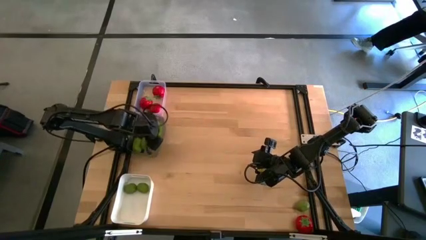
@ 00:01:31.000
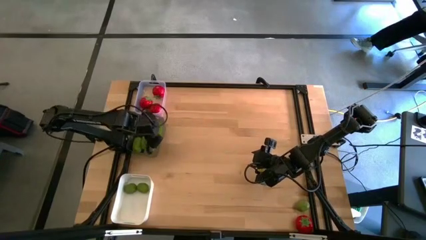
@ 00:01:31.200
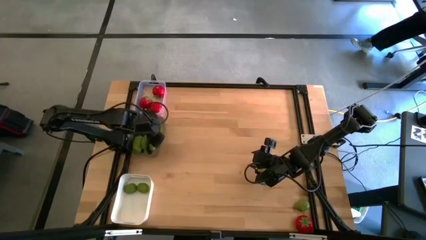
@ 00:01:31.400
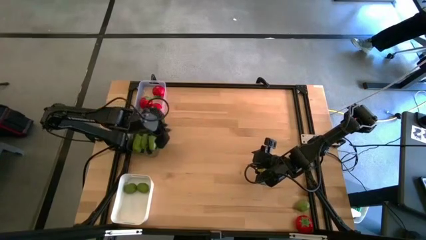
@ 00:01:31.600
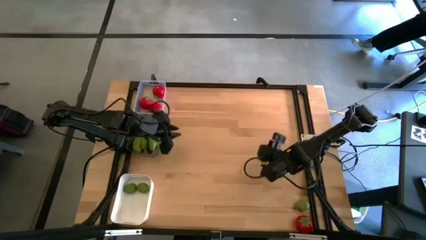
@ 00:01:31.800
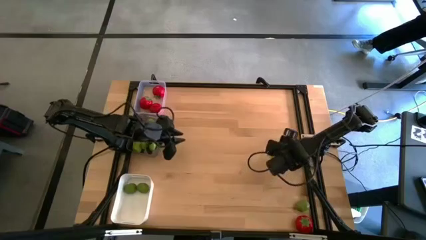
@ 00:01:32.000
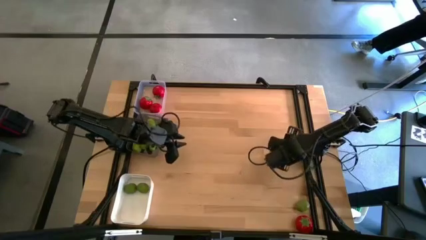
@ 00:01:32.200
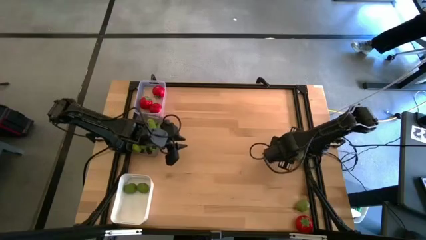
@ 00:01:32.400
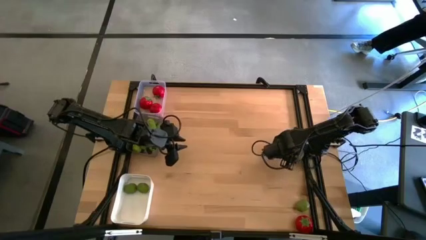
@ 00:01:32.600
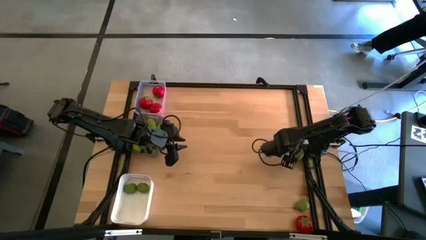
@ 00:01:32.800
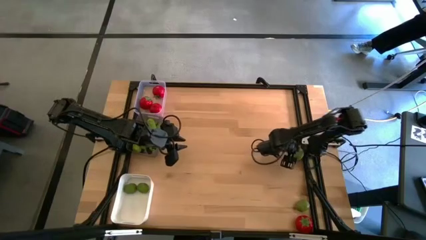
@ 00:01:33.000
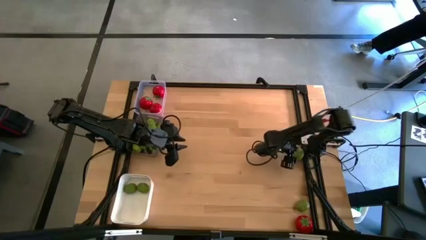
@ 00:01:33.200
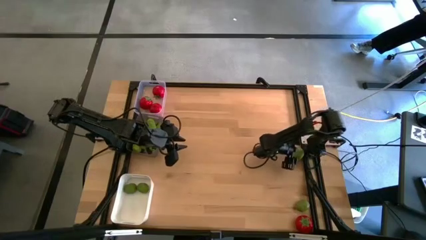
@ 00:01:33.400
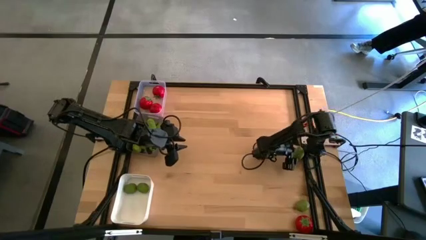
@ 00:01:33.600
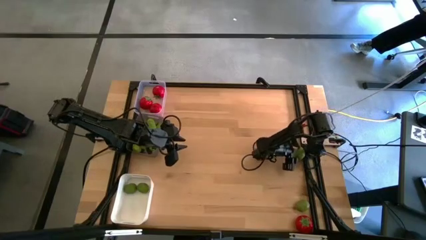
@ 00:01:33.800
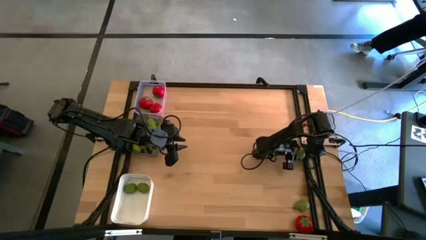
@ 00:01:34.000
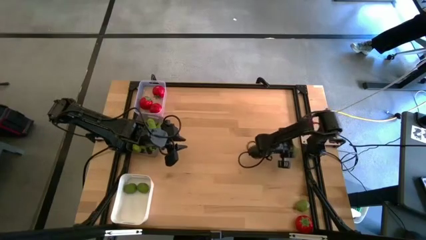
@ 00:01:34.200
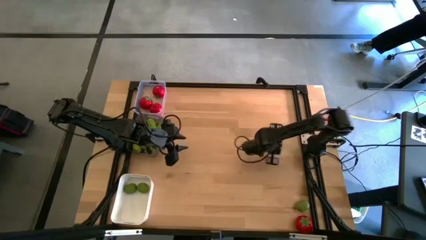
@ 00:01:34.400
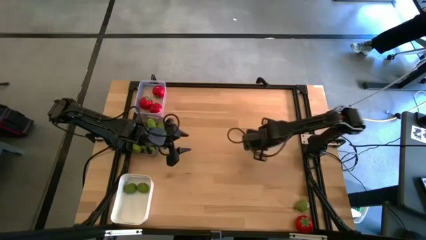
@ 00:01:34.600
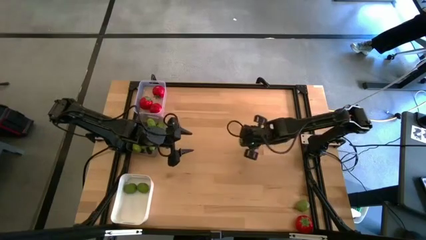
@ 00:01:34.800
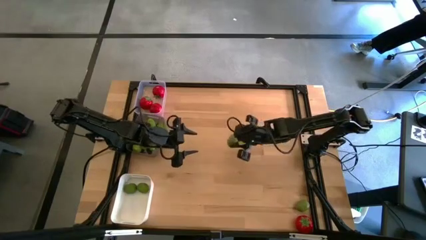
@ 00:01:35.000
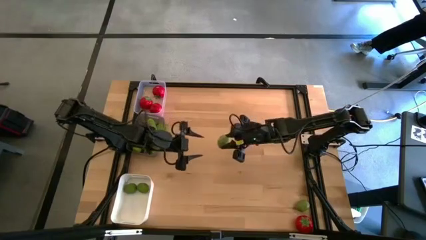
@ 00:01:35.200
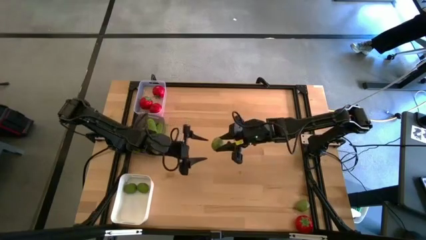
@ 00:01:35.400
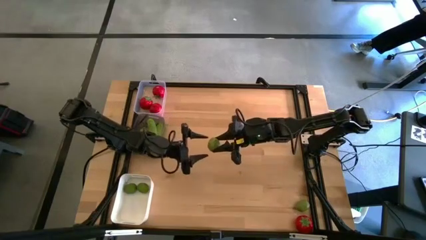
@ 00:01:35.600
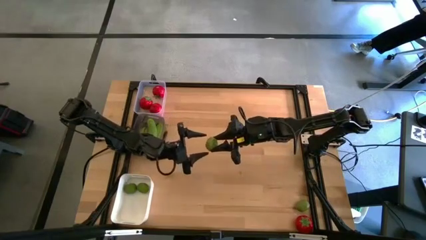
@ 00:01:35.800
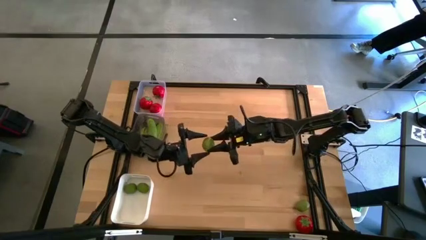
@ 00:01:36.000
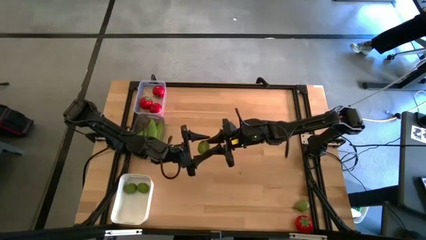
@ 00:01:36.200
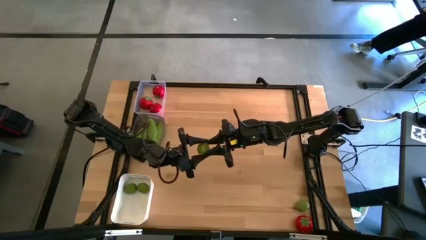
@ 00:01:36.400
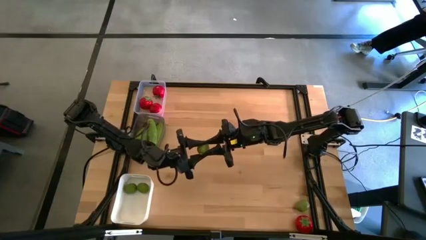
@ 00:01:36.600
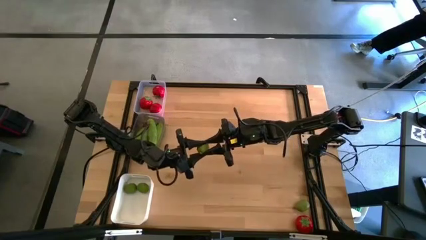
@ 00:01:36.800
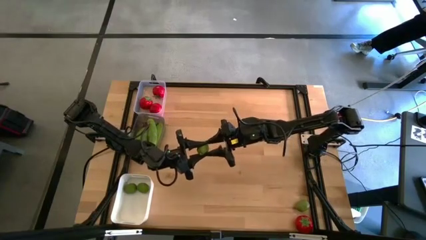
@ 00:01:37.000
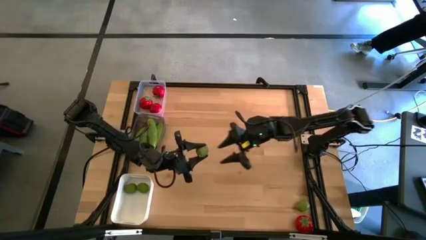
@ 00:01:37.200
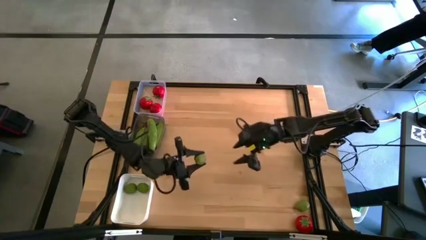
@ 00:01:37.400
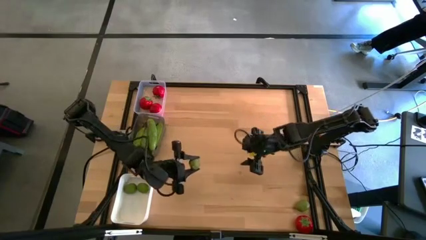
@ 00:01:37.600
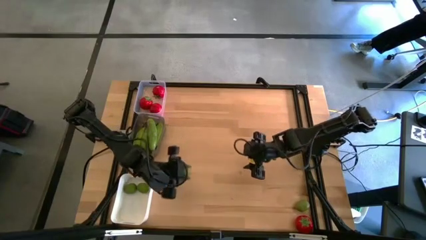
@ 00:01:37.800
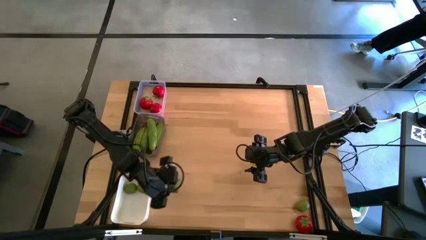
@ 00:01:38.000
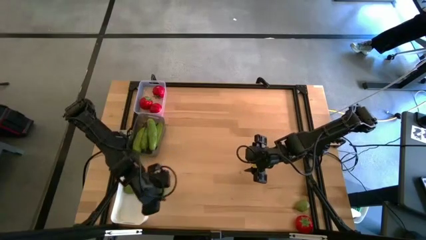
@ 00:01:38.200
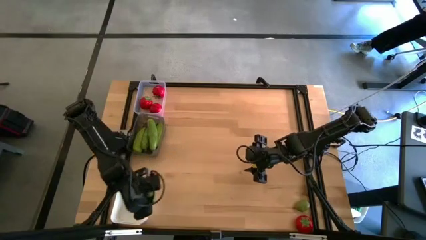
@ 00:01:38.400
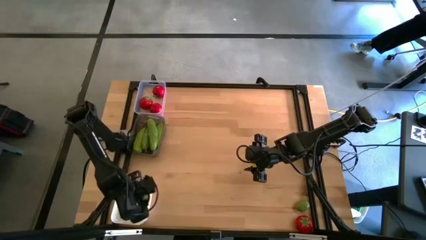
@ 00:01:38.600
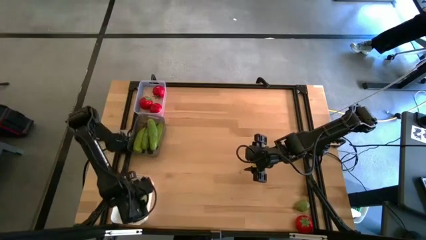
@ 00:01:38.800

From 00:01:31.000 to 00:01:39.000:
Task: Sort produce into baskets
Put the top lime into the white bin

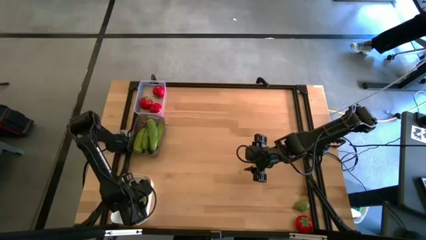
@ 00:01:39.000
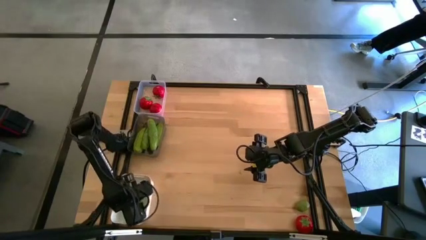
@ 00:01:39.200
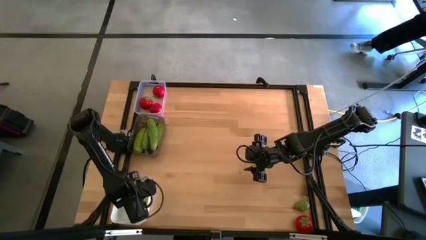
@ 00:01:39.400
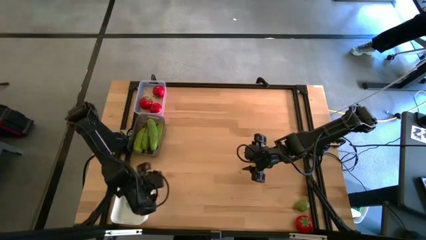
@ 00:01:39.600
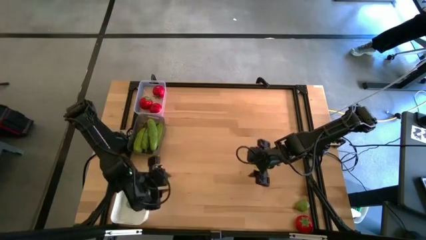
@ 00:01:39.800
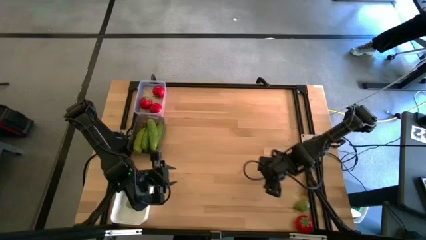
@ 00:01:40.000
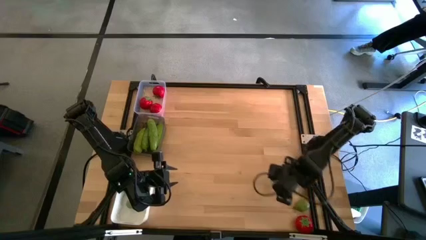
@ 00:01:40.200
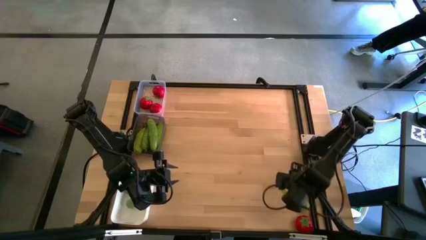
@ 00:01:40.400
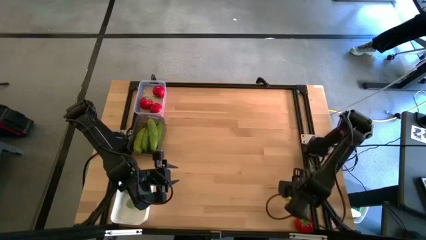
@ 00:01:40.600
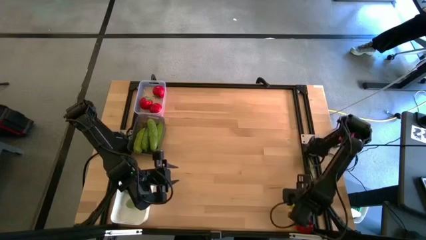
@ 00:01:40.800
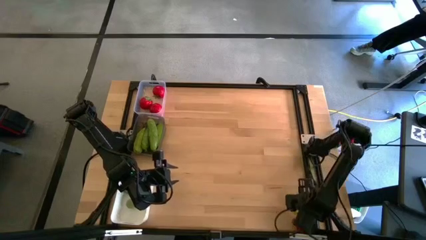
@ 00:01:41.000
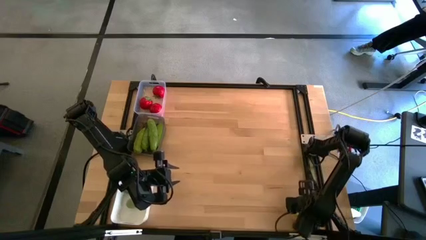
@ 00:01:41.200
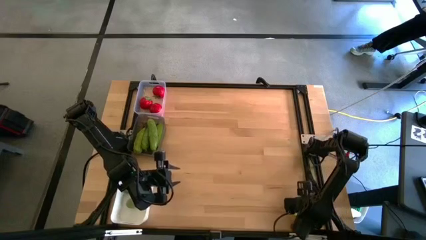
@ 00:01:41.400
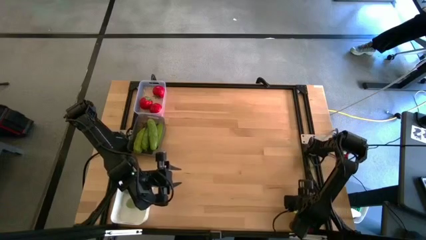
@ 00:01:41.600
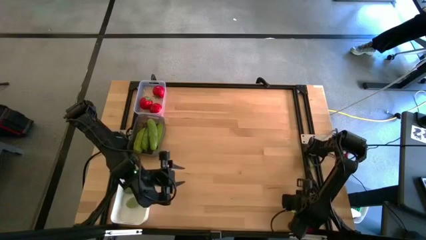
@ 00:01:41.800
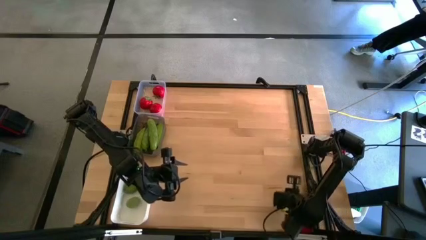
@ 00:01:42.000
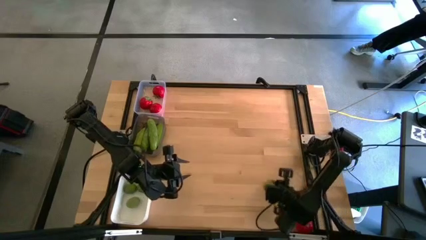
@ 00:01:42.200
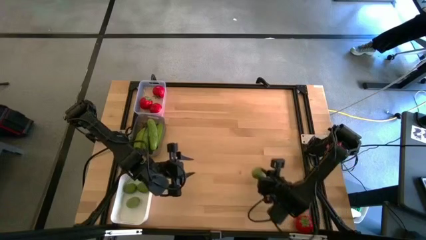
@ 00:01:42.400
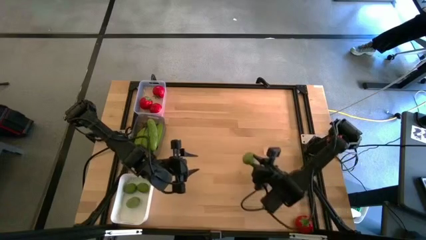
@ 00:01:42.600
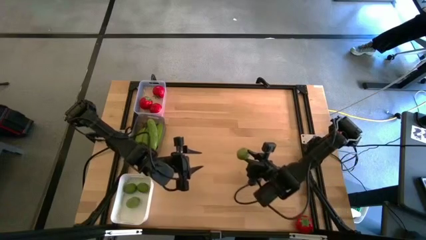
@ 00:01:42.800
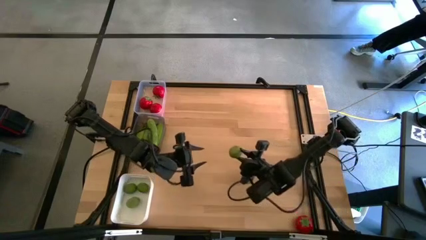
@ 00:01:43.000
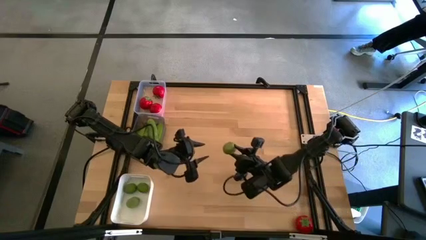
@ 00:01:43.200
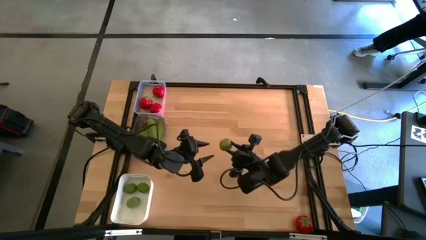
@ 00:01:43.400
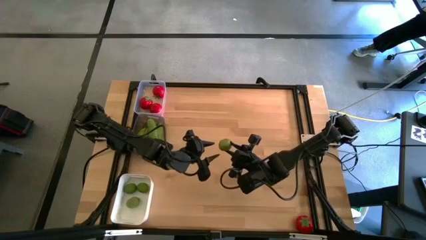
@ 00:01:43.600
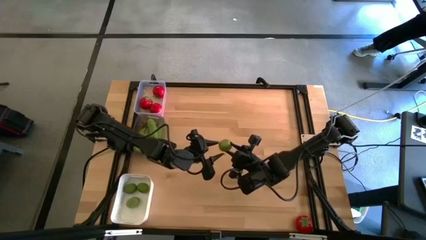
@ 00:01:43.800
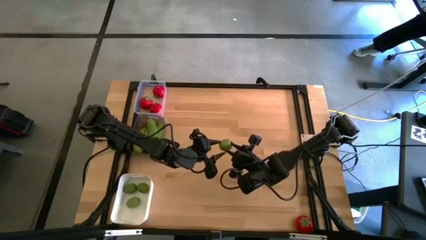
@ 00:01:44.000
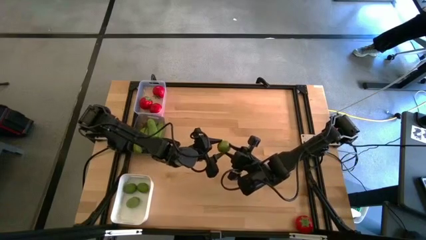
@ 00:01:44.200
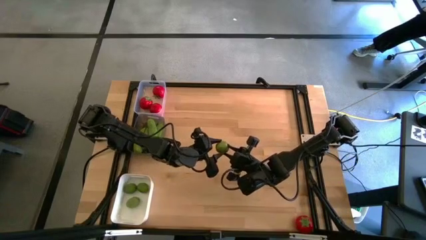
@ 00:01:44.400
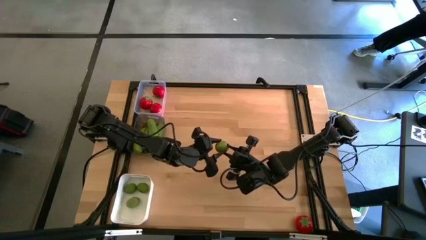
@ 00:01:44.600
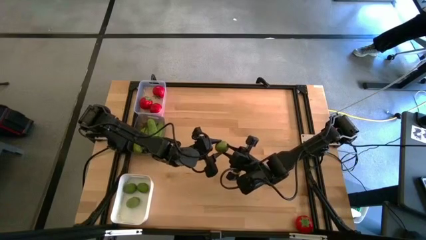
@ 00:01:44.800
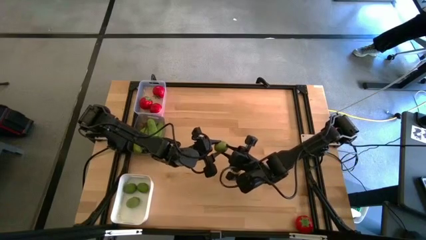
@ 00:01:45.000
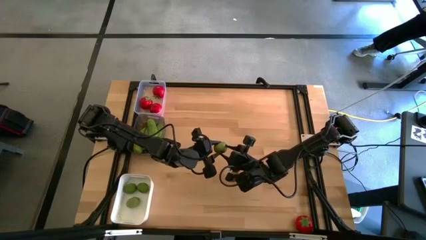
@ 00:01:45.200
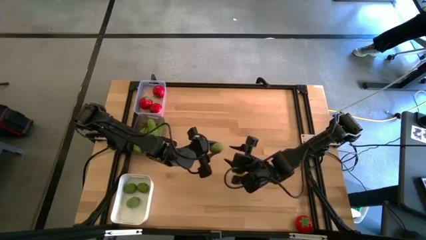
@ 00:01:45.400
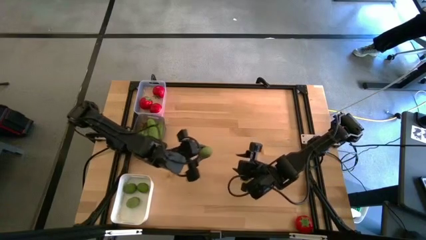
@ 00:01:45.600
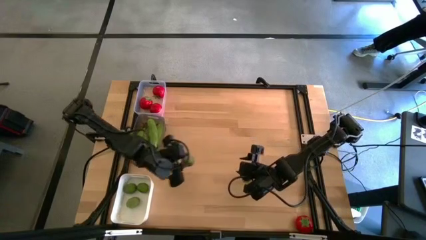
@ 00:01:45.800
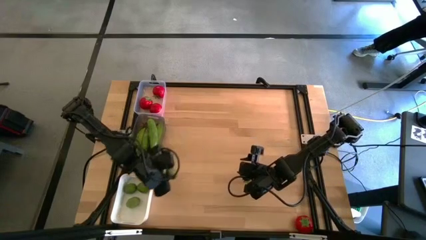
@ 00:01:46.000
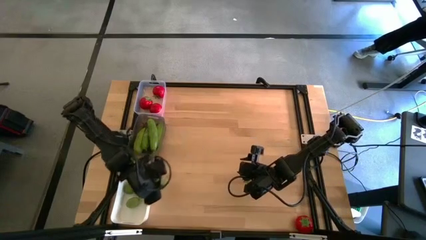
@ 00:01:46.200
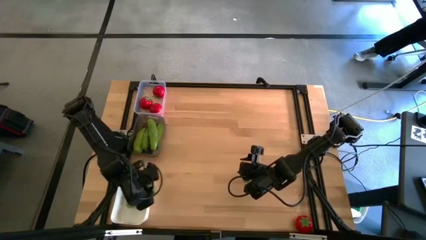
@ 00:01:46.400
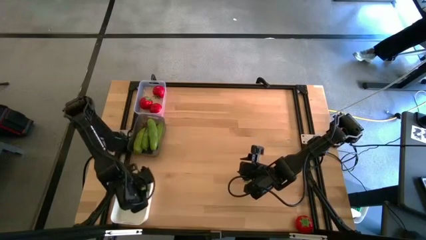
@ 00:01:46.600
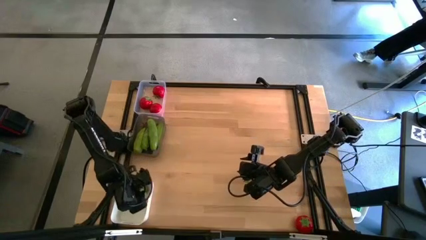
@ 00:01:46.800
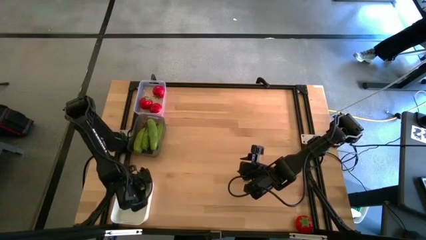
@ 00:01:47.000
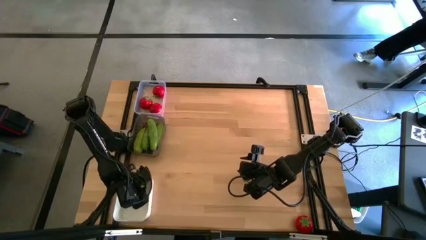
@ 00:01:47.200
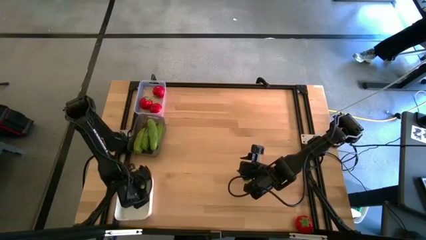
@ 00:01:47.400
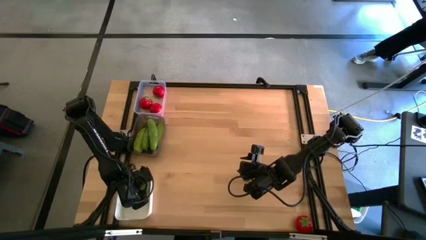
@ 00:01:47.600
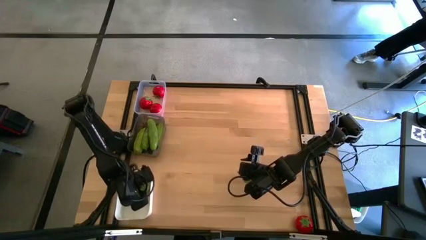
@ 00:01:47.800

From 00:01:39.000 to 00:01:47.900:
Put the lime into the white bin
